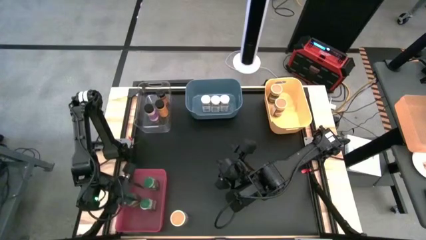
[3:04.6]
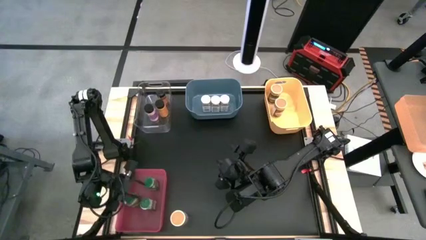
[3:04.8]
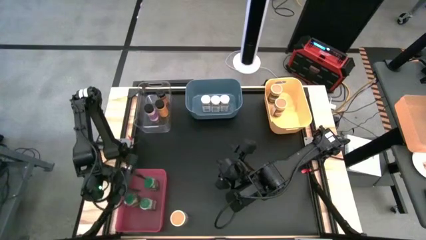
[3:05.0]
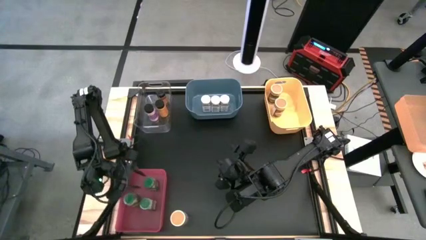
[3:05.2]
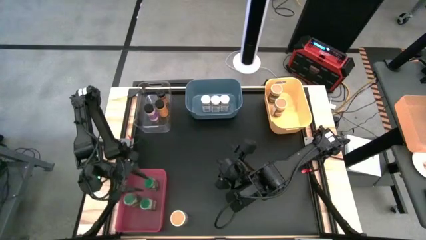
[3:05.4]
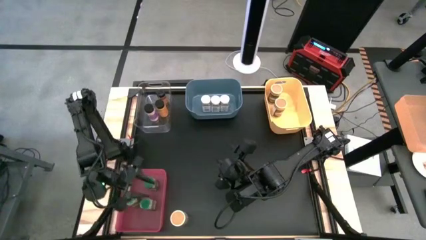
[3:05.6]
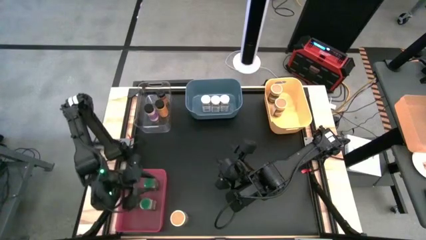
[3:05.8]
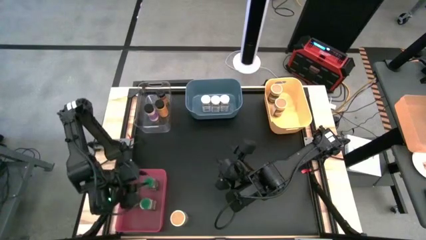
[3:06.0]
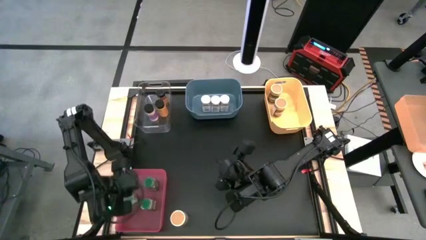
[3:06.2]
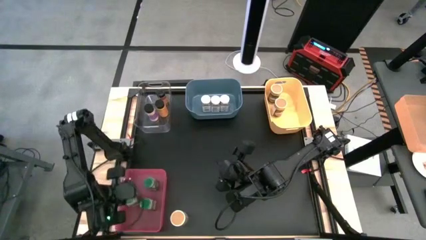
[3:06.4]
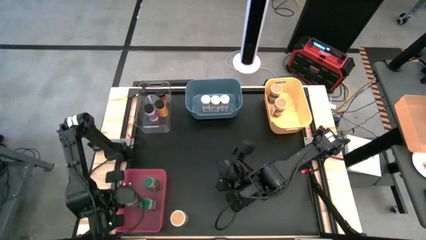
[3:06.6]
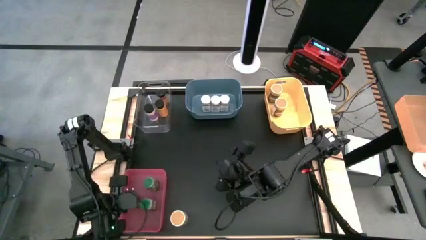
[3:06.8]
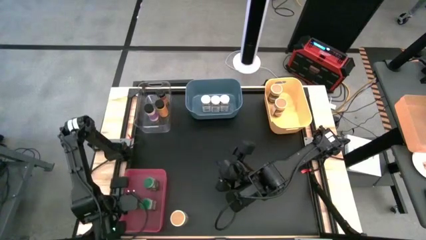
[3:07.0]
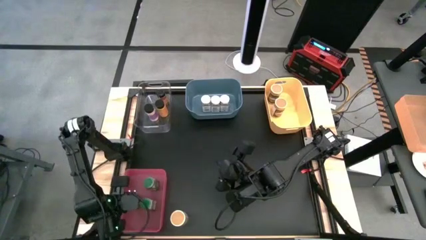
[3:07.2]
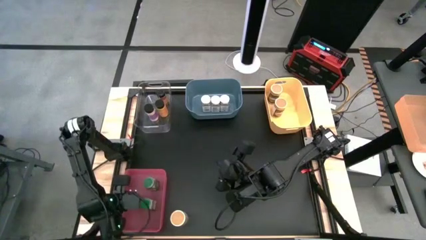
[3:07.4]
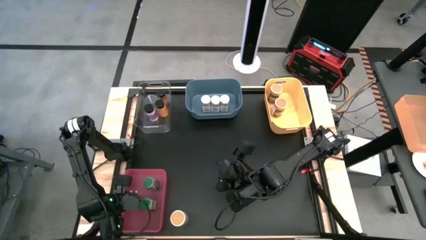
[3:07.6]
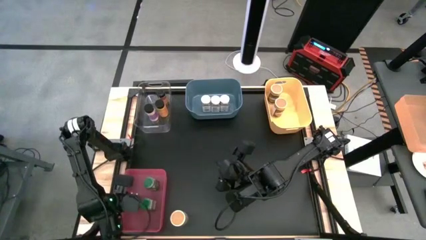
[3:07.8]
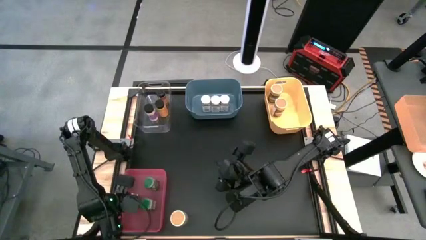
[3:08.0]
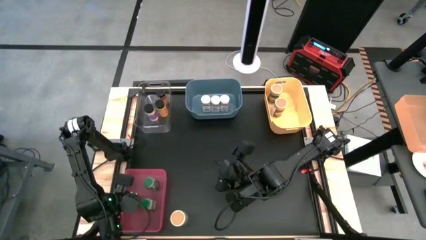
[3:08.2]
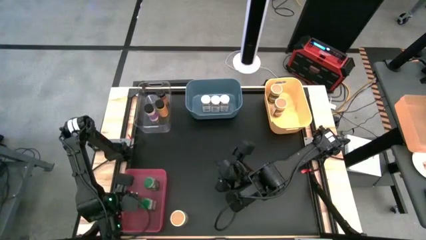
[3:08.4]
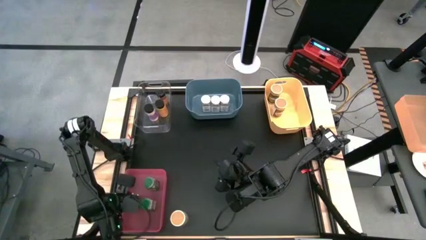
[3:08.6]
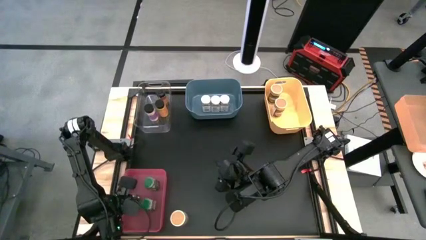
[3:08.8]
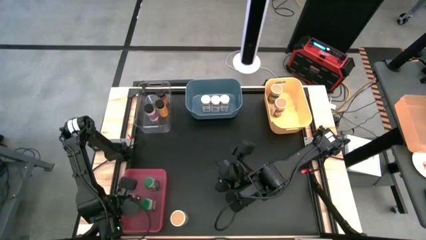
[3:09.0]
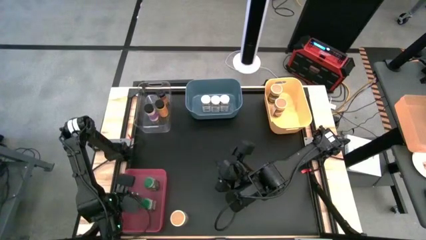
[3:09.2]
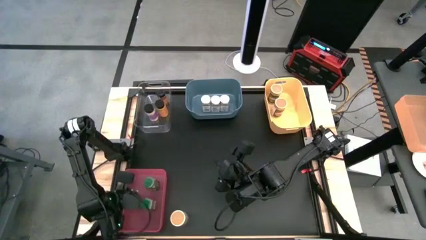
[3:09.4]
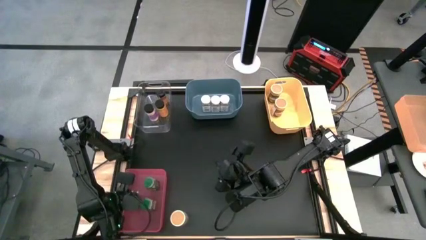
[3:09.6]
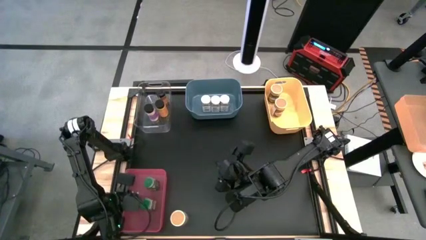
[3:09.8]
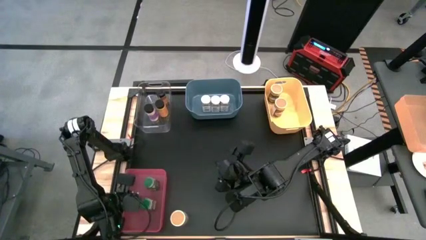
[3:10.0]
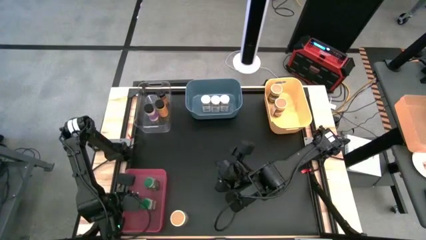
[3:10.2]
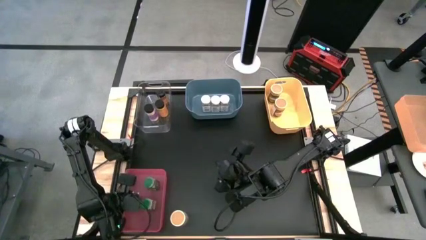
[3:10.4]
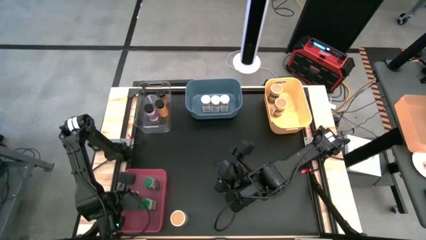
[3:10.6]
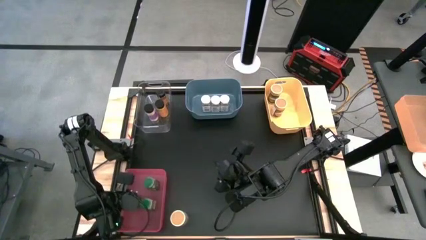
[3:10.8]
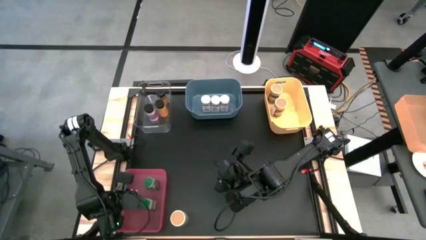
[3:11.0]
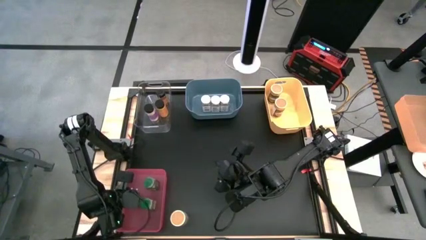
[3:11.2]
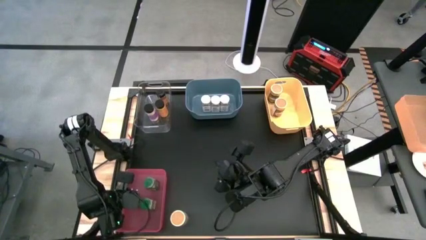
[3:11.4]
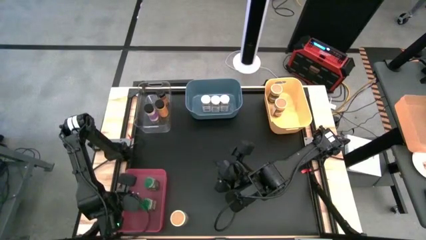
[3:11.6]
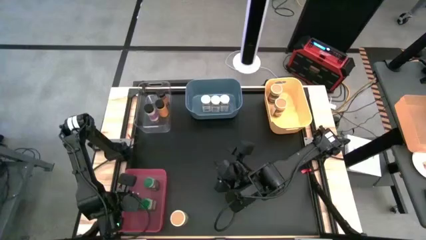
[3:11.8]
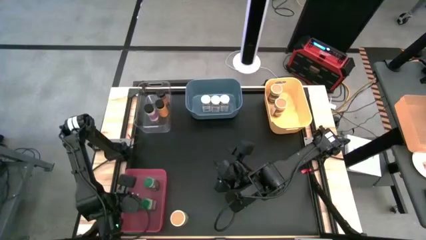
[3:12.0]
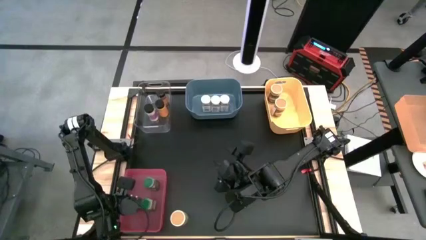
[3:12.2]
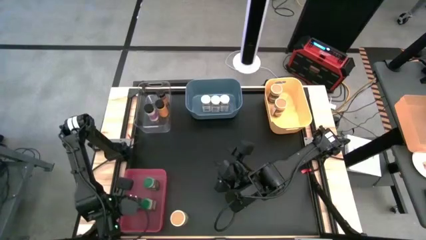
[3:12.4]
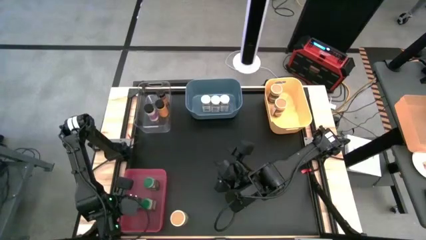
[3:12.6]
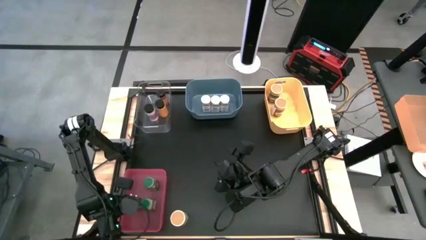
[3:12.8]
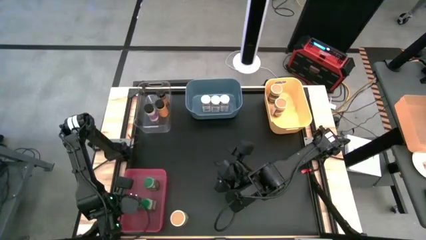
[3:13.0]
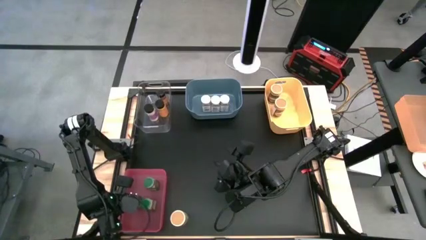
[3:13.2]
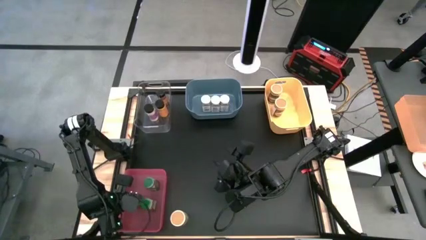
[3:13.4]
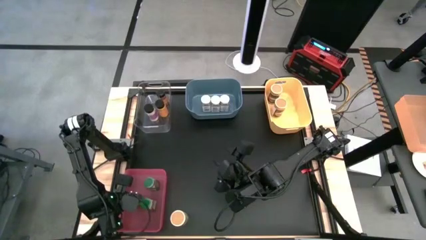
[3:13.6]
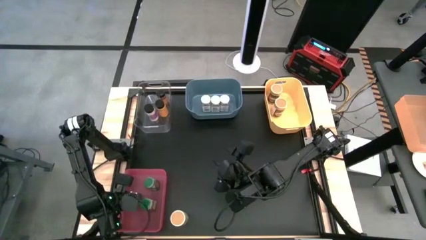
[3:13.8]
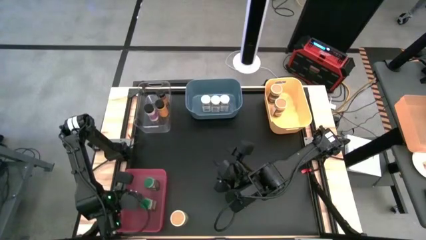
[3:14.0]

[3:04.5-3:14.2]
Task: Sort spices by type
Adjust the green seasoning bottle

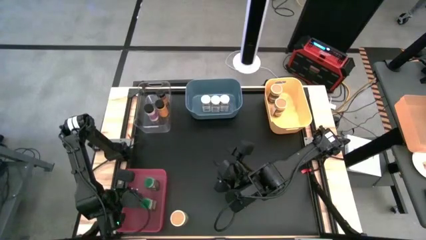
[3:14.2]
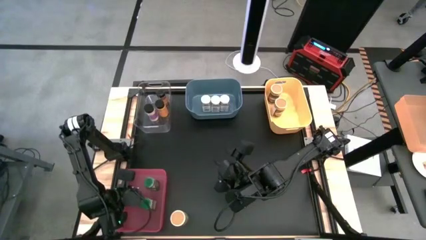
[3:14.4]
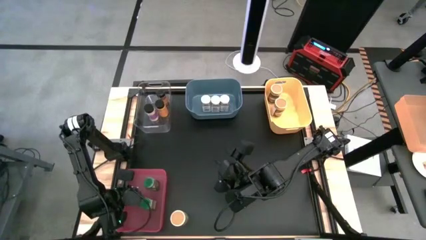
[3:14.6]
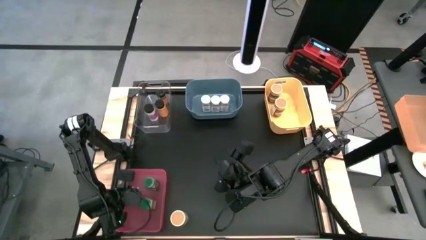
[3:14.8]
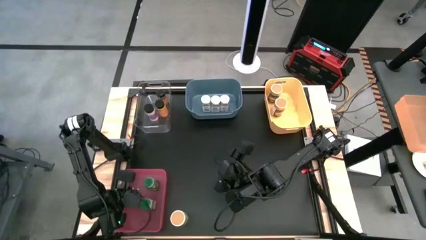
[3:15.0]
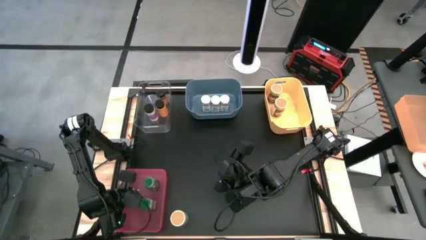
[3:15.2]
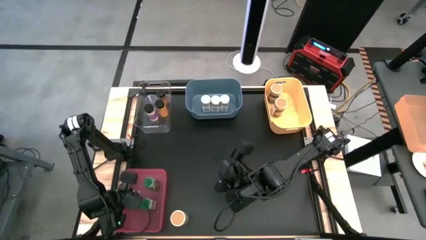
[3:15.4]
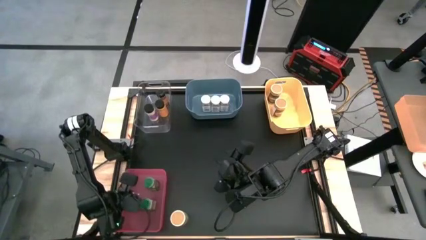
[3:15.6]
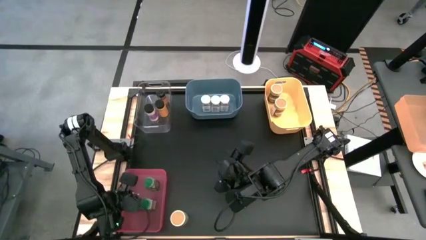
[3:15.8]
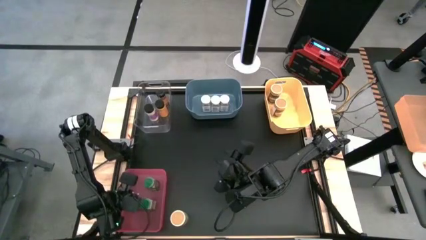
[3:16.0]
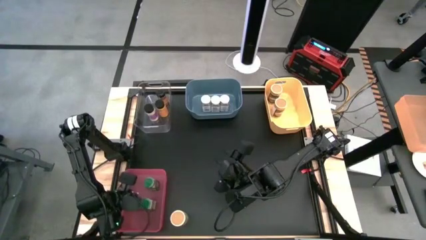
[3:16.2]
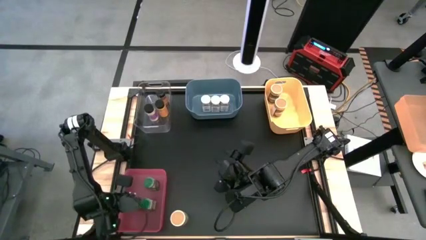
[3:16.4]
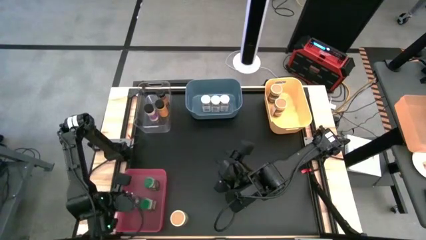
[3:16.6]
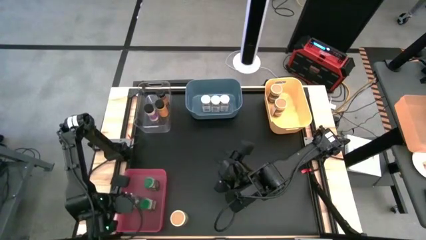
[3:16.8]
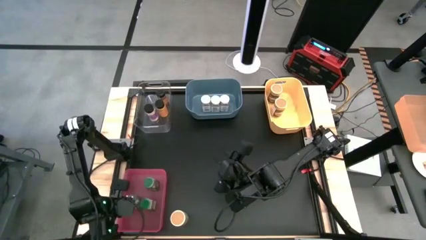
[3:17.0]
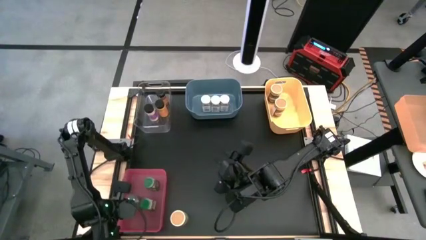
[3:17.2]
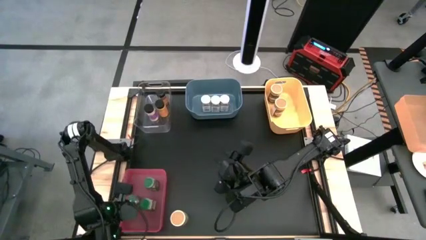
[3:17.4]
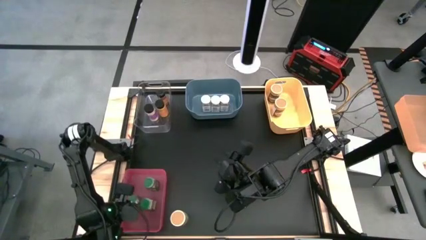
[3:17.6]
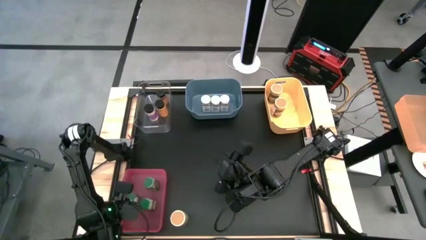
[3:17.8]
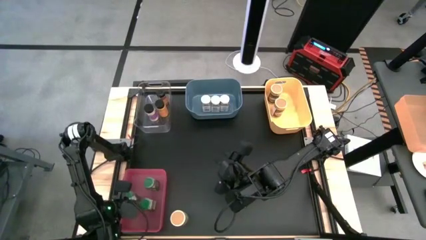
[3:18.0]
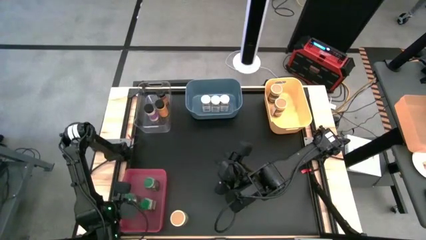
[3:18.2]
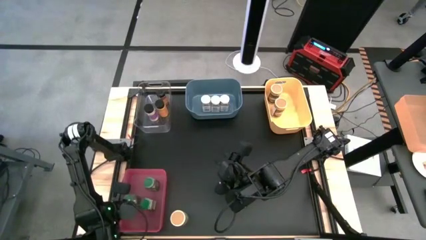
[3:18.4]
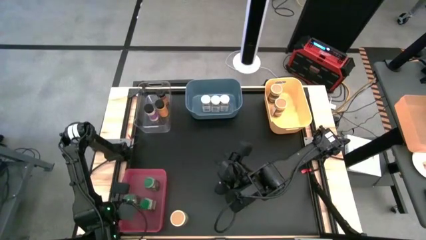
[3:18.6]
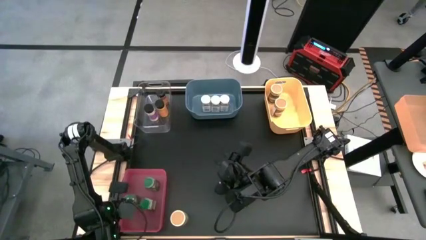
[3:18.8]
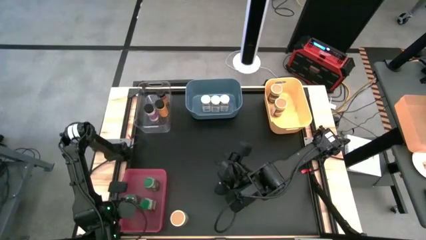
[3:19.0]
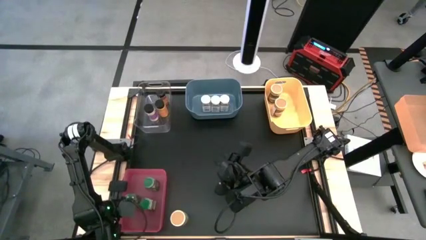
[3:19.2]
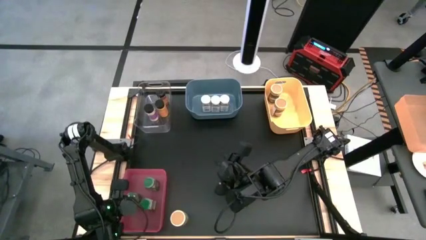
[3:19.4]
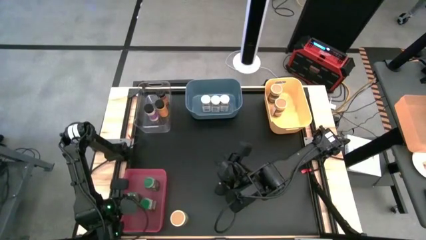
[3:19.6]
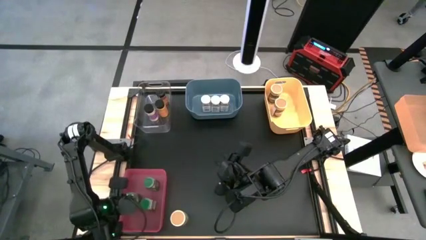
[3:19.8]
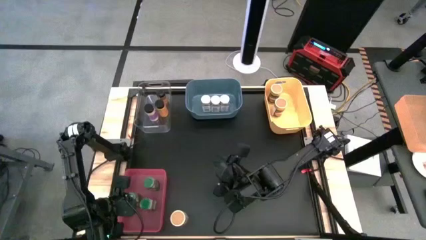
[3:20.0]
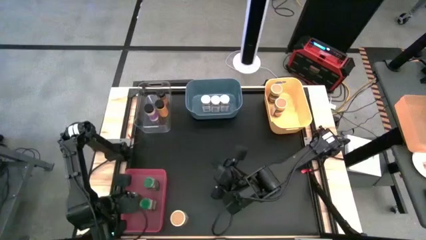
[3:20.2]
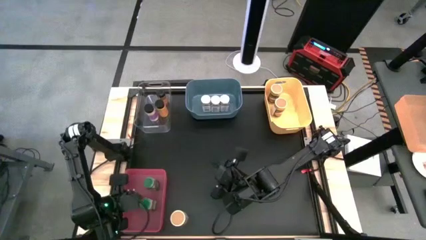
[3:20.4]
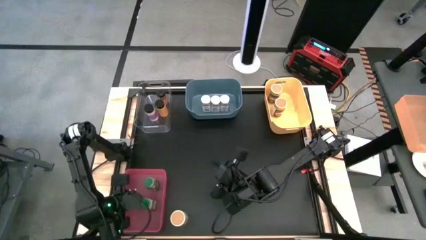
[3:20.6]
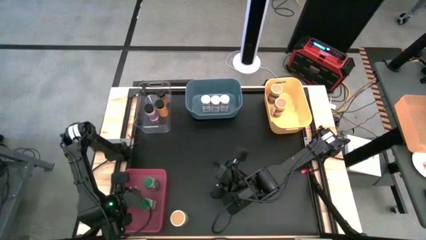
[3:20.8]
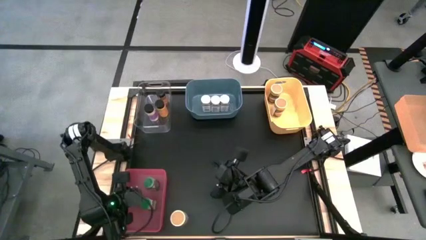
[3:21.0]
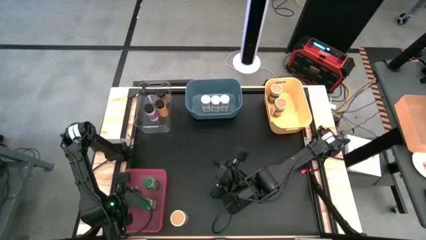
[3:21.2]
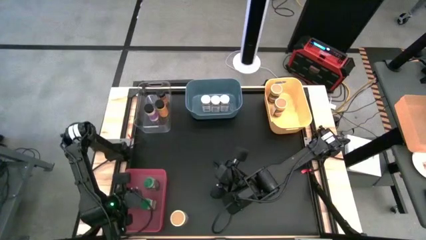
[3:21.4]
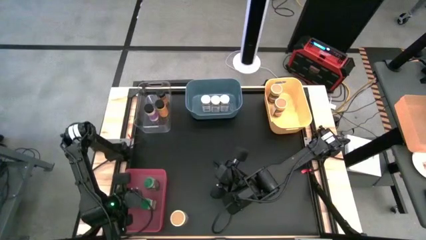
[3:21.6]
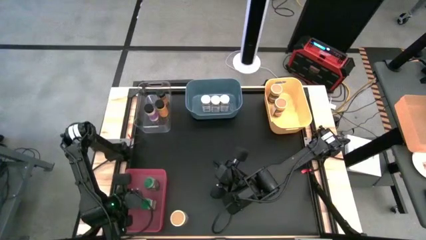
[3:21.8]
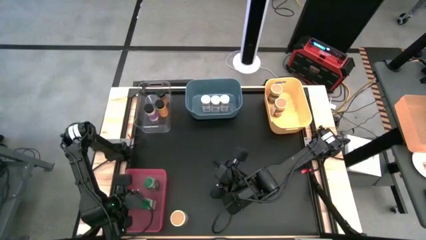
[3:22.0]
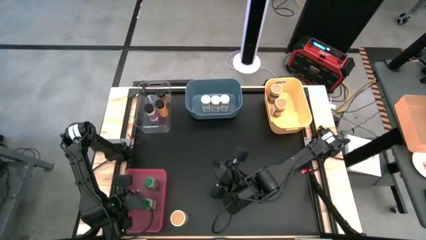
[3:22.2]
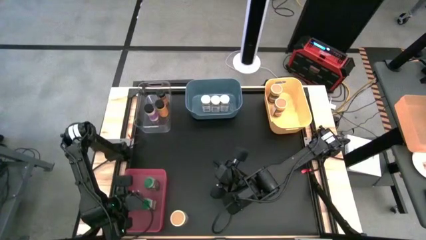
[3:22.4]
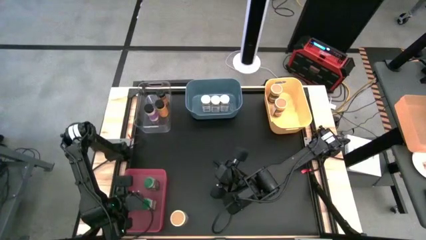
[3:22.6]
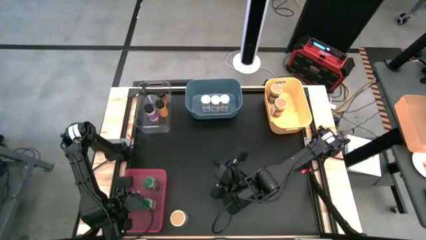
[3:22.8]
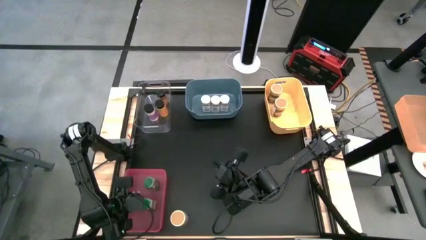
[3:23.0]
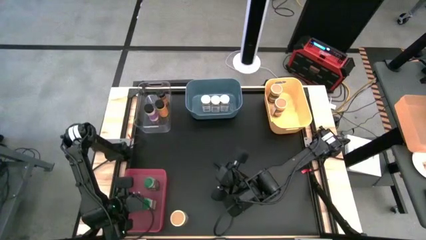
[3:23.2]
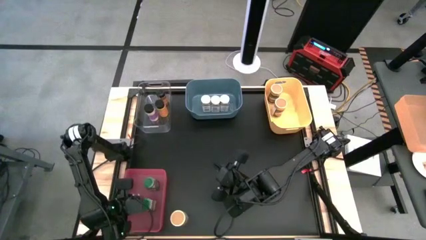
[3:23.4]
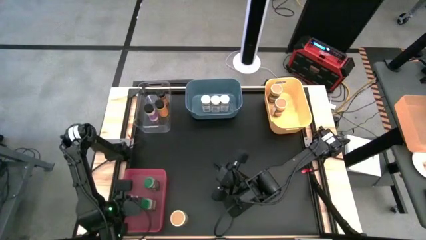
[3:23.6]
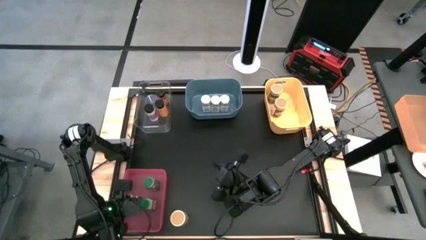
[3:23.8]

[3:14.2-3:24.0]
Adjust the green seasoning bottle
